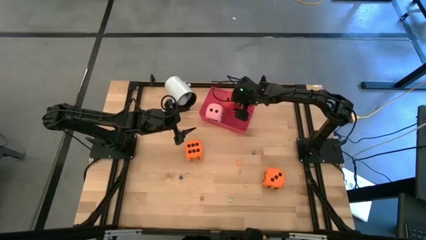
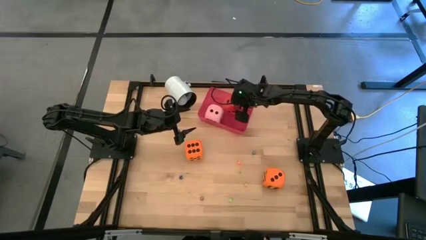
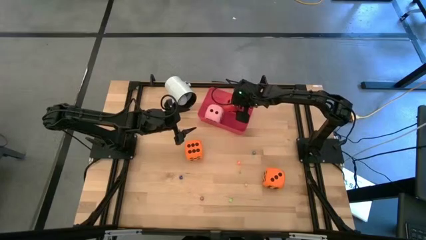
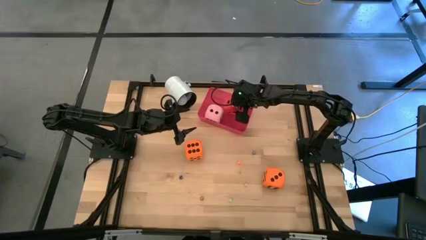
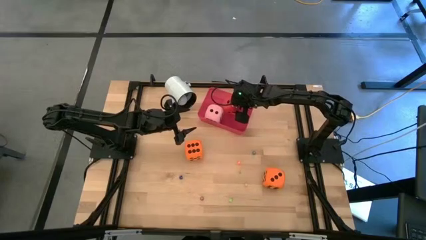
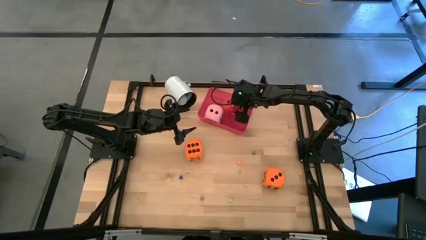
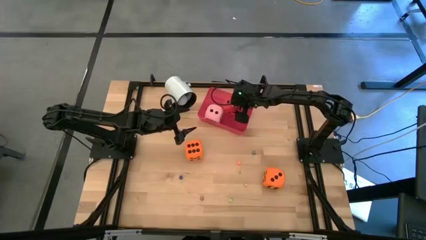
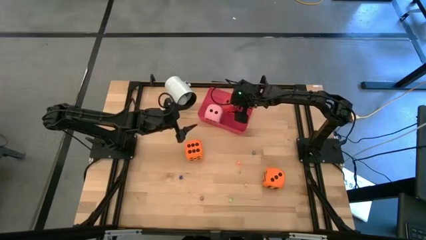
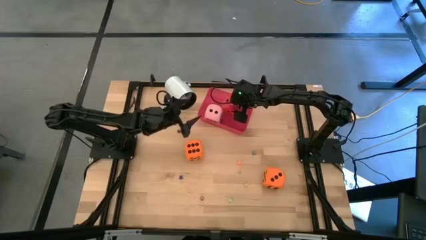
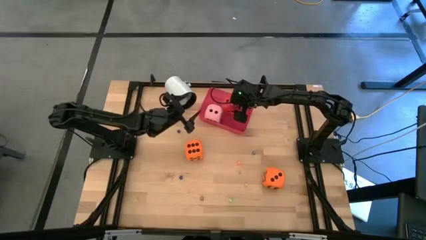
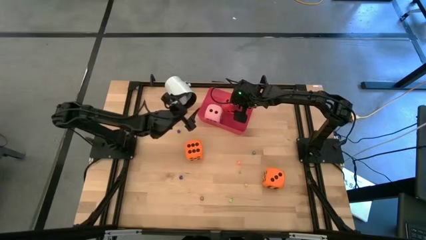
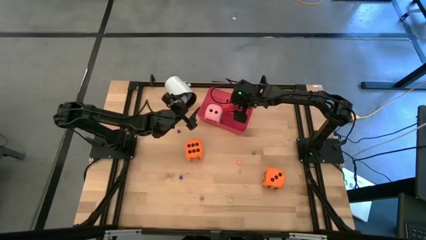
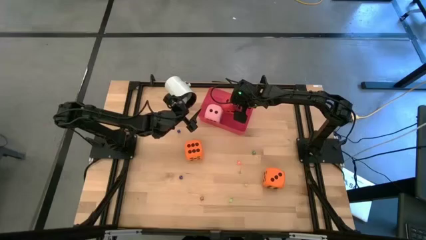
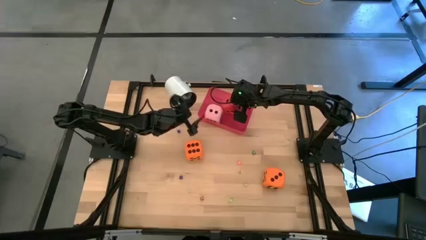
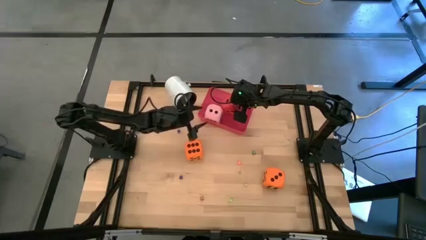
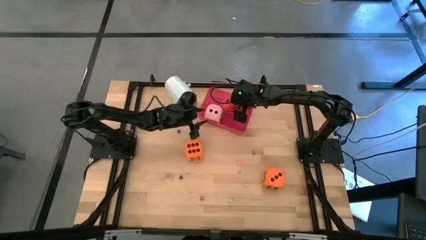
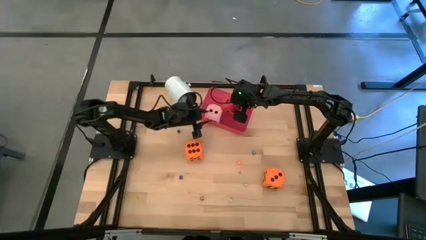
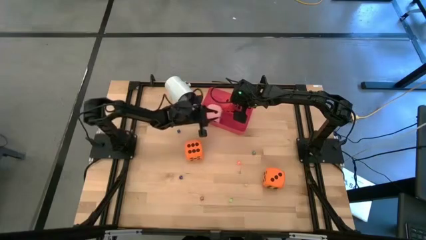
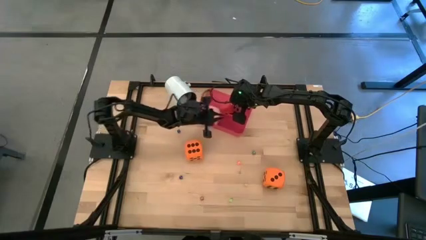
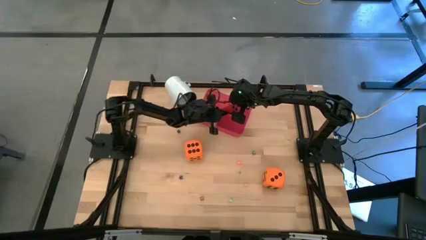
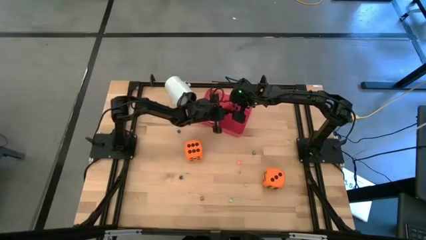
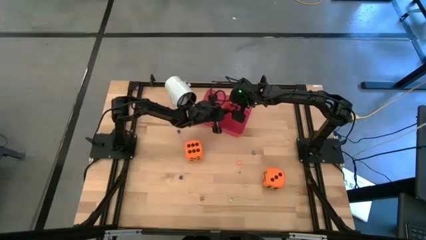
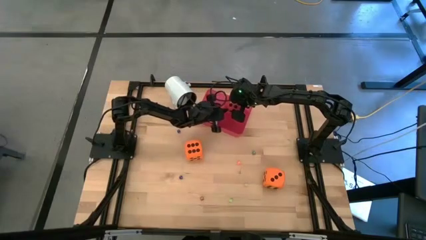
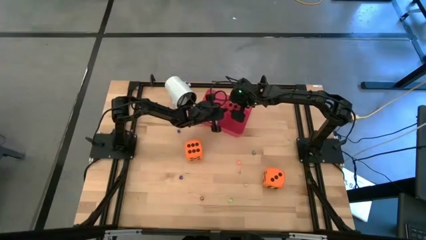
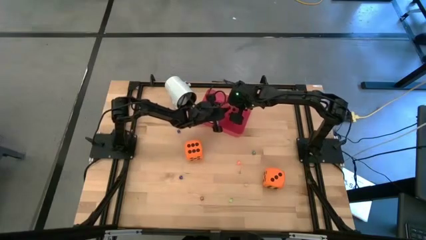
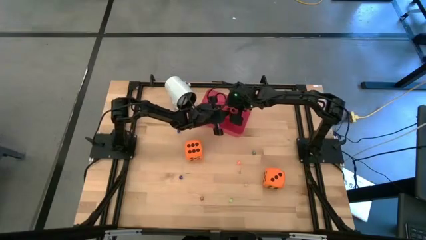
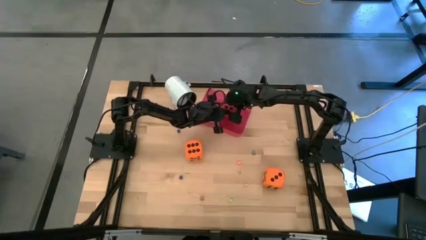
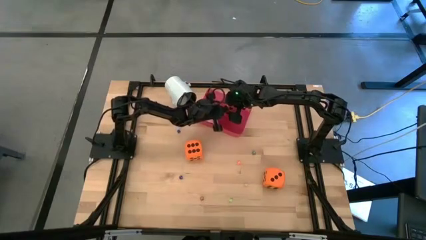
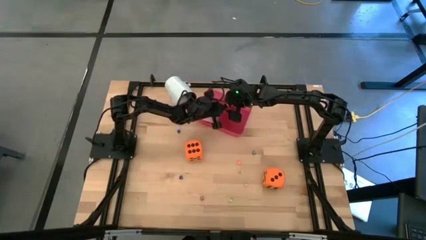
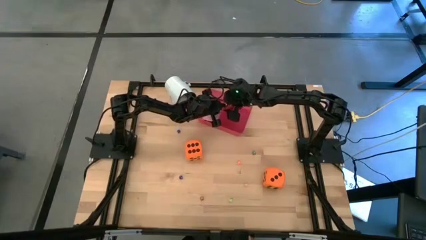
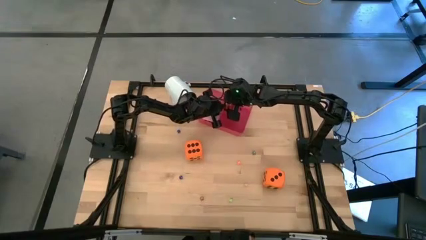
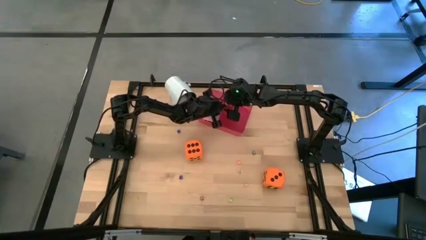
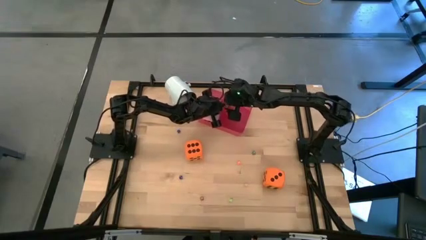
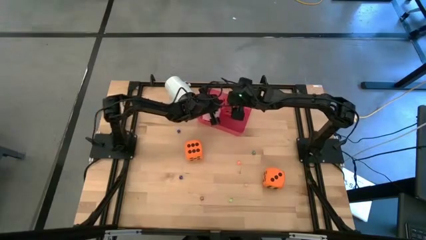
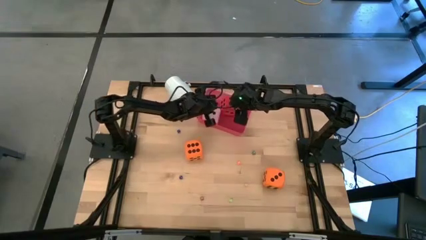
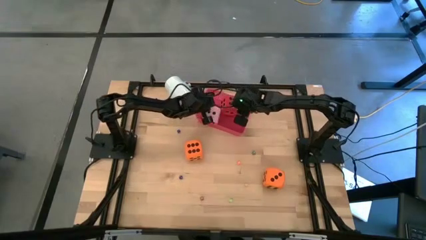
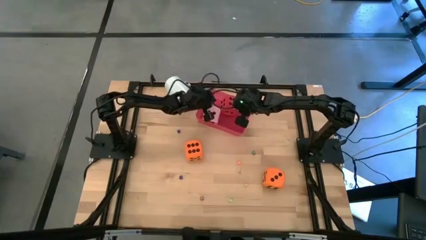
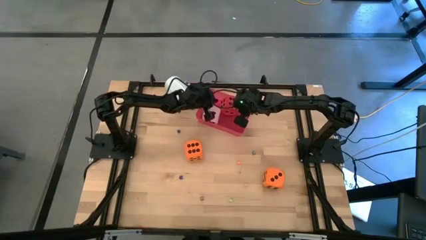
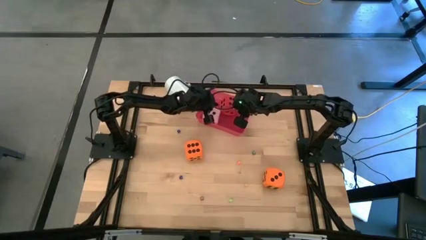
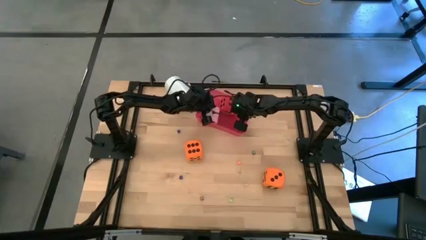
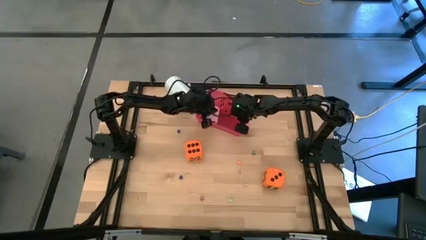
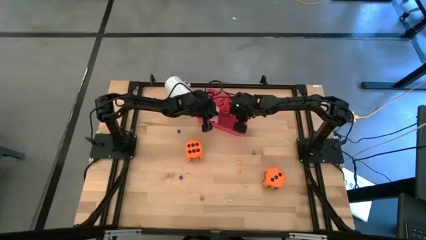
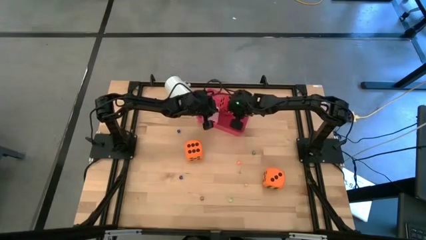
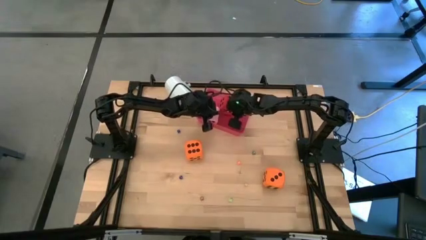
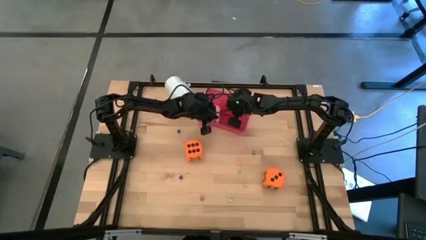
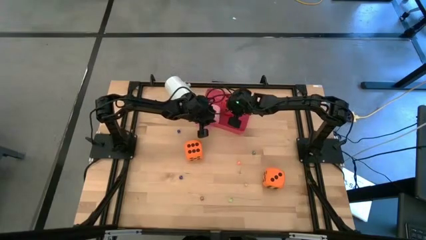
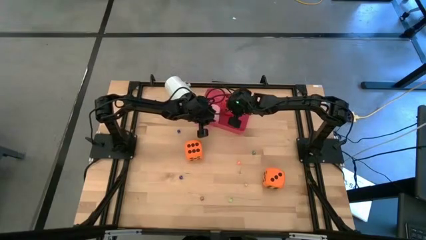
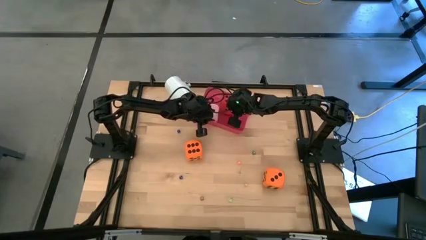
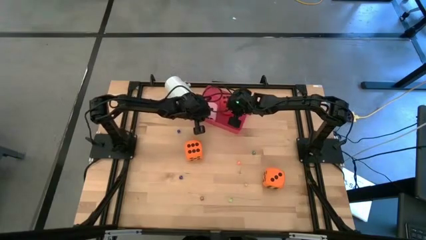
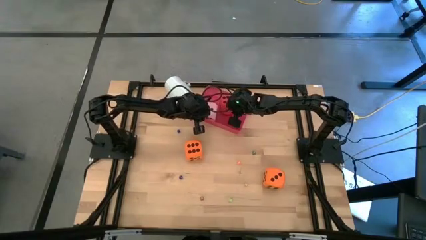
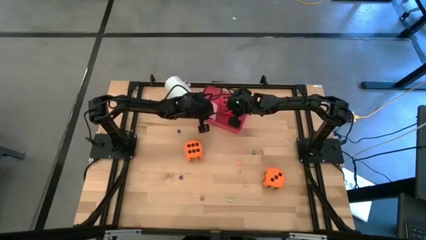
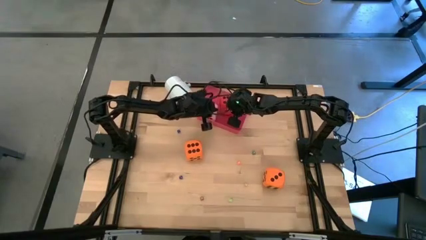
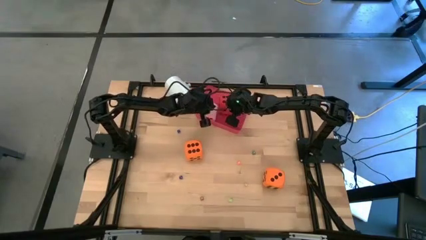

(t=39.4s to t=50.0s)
Task: Pick & Place Dice
Put the big red die into the red bin

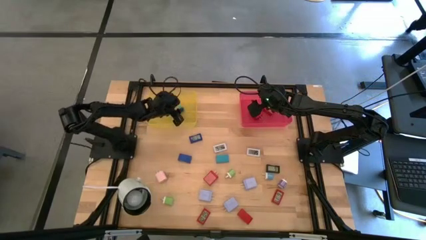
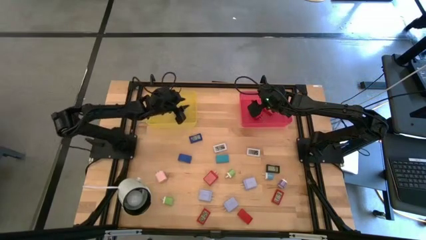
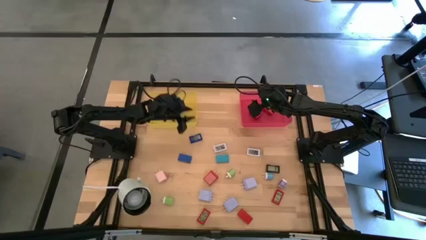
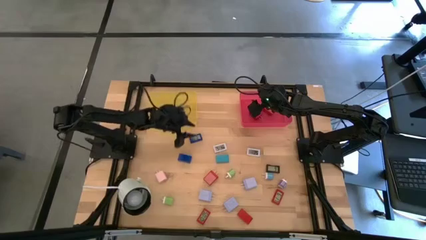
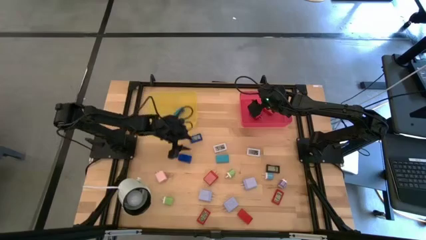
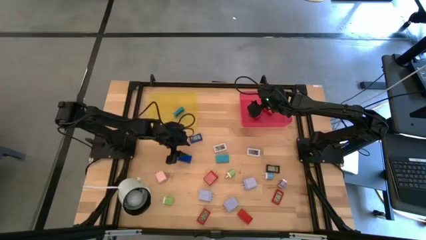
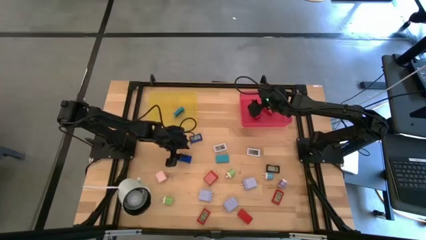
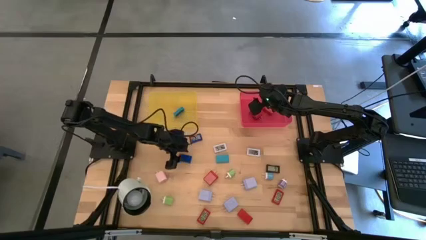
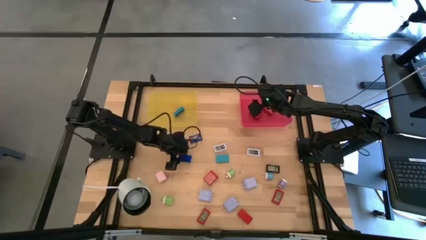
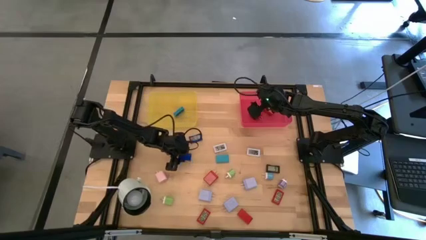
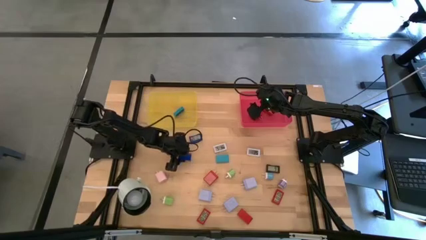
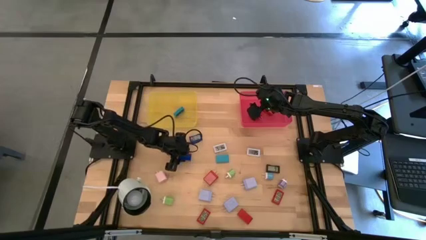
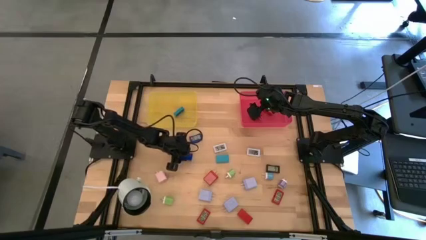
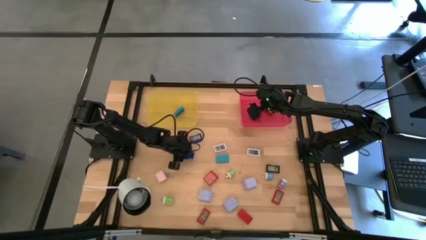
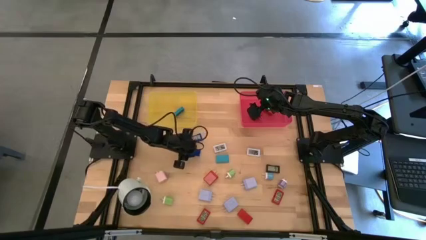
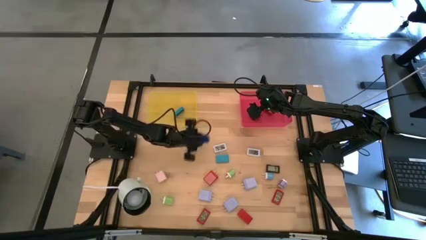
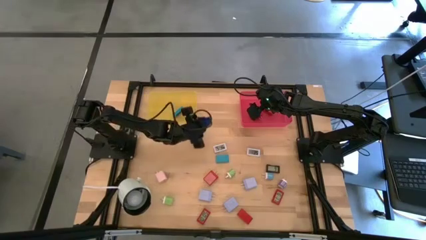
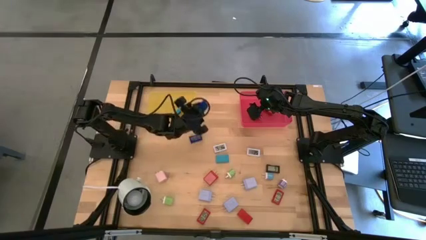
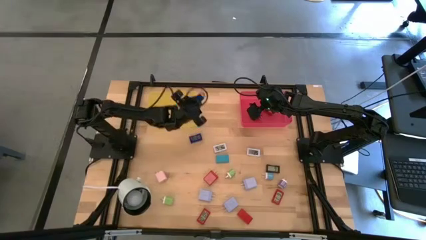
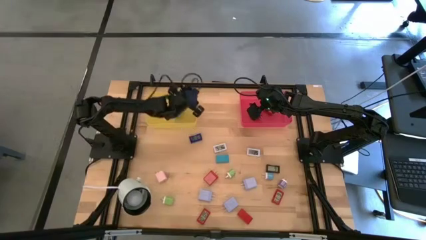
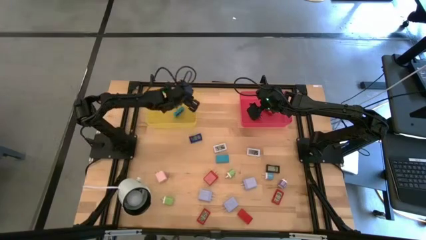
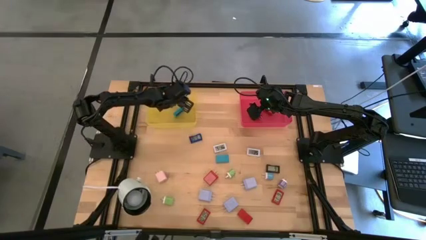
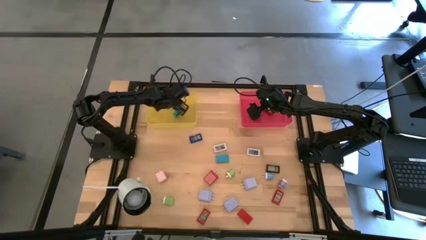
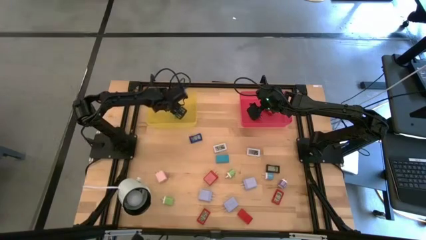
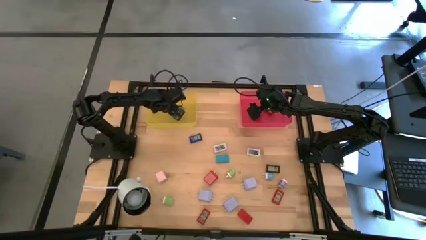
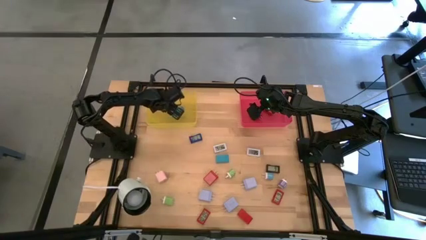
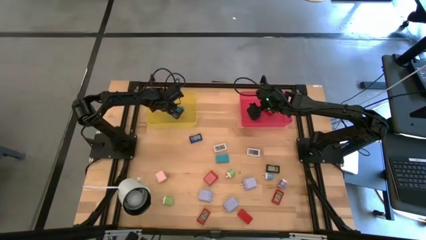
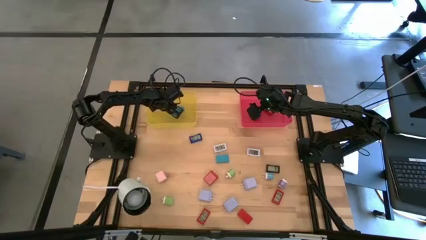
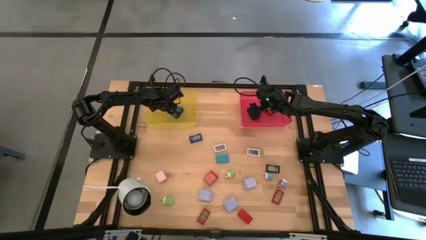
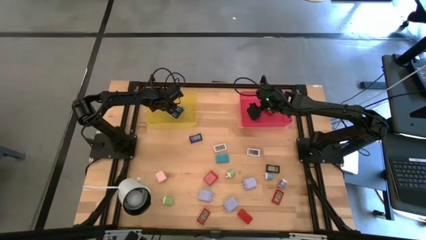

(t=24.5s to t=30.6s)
Task: Pick & Place Office items
Put the bottom blue digital clock into the yellow bin
